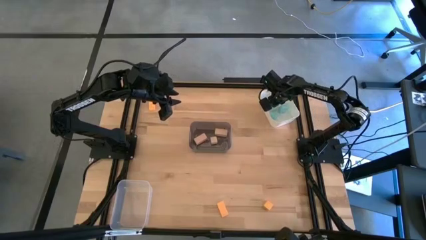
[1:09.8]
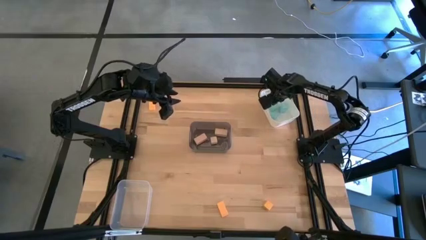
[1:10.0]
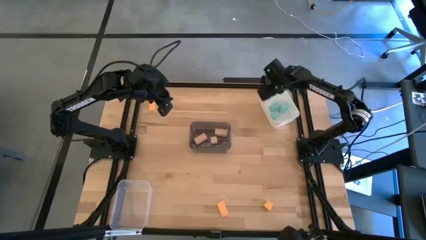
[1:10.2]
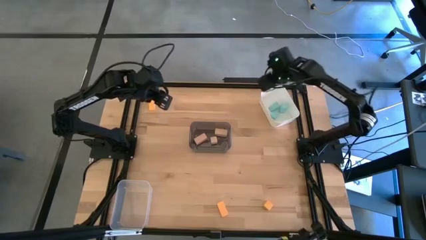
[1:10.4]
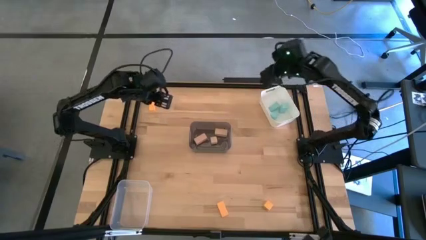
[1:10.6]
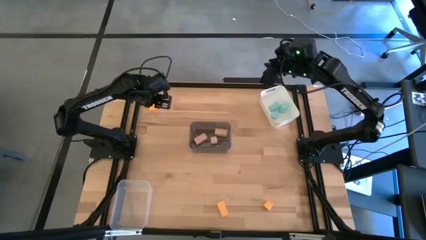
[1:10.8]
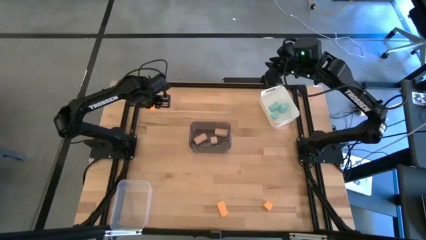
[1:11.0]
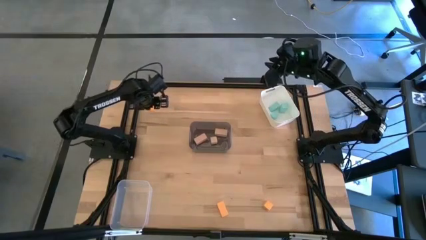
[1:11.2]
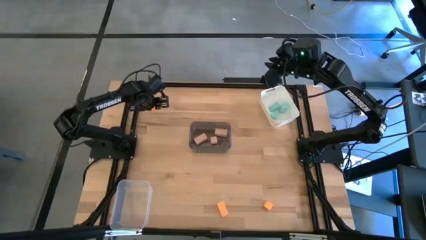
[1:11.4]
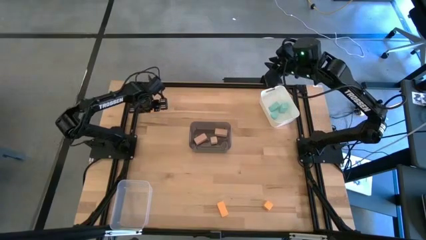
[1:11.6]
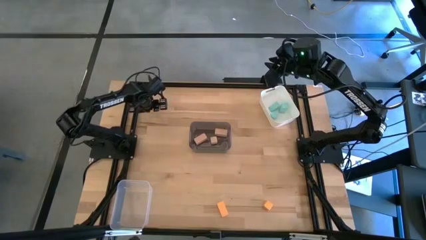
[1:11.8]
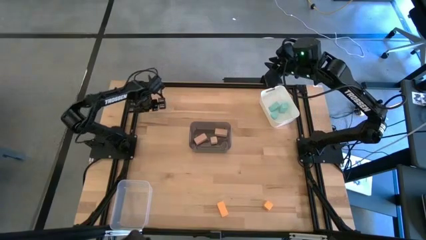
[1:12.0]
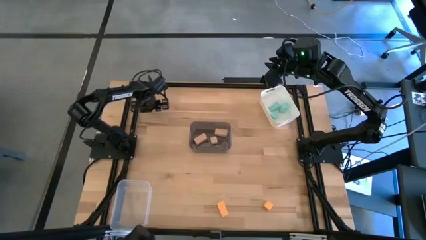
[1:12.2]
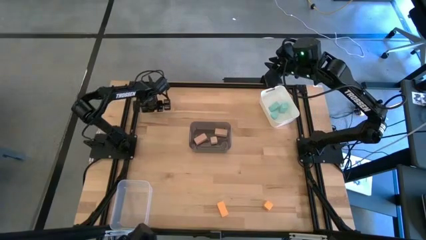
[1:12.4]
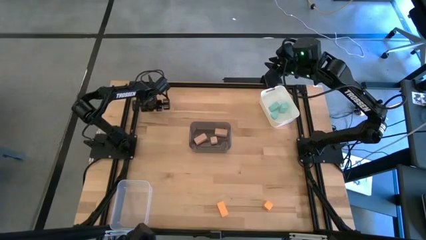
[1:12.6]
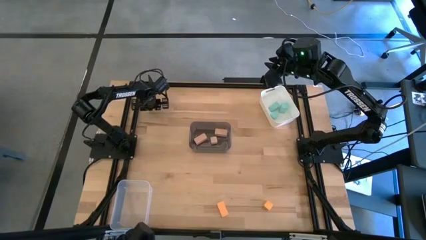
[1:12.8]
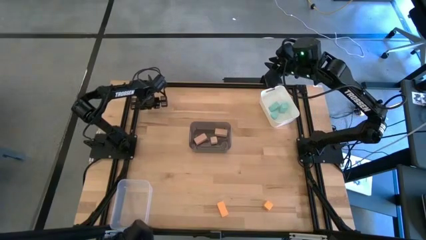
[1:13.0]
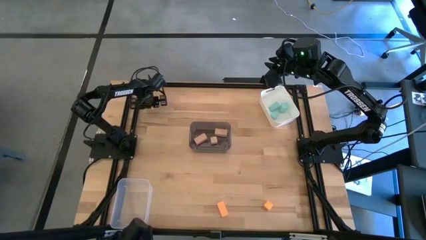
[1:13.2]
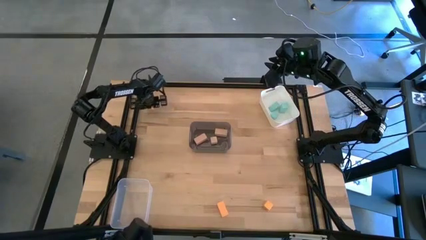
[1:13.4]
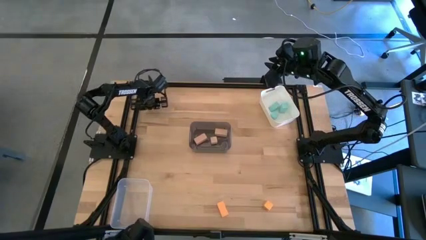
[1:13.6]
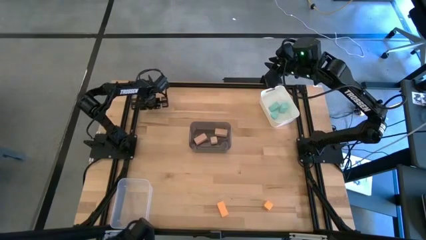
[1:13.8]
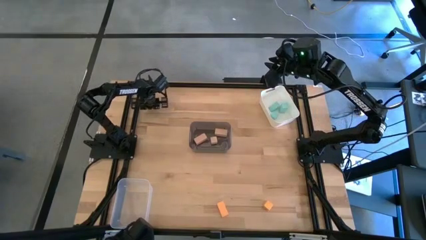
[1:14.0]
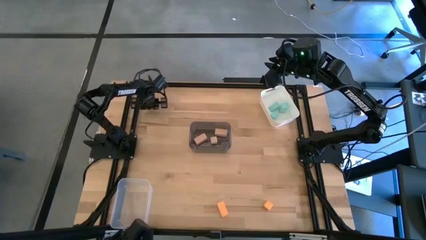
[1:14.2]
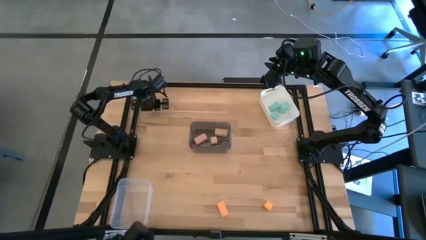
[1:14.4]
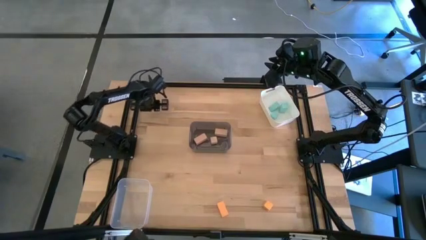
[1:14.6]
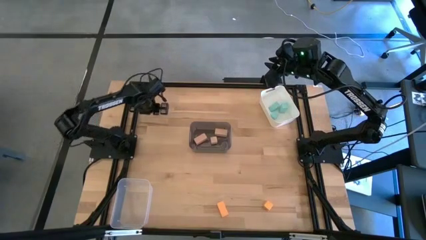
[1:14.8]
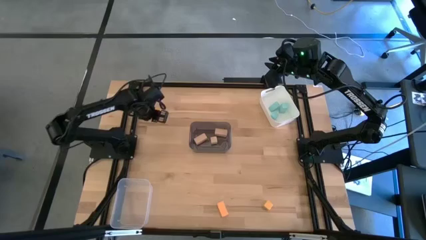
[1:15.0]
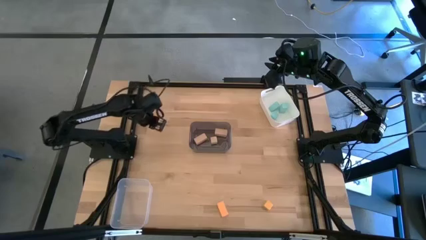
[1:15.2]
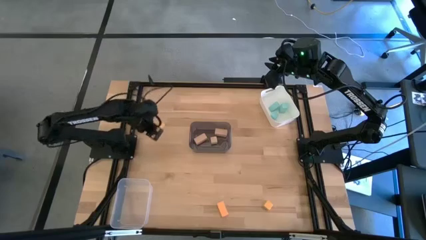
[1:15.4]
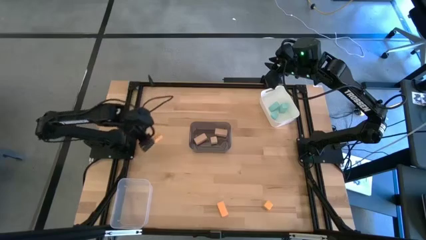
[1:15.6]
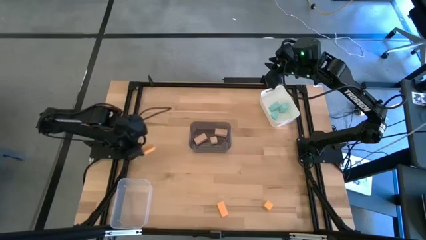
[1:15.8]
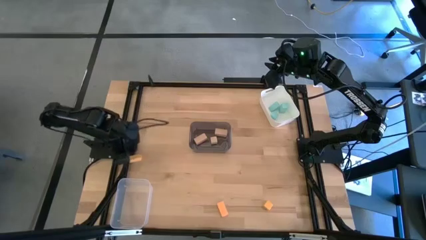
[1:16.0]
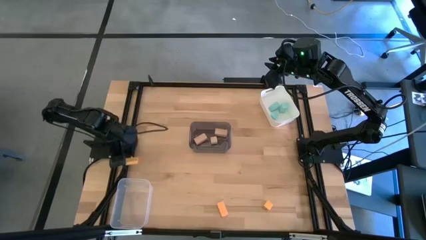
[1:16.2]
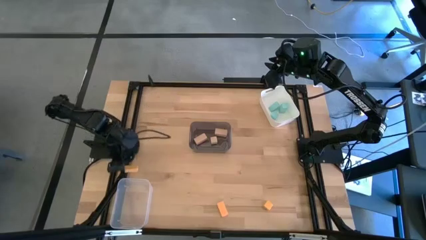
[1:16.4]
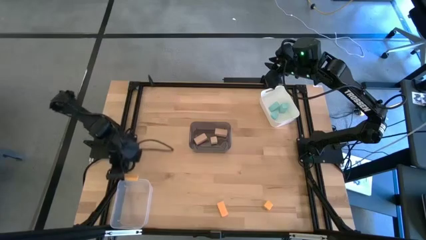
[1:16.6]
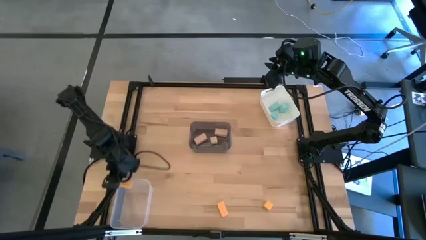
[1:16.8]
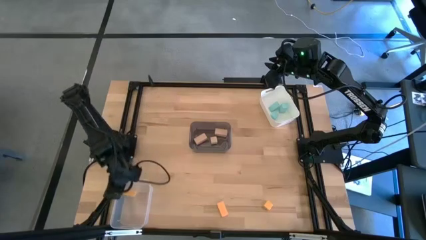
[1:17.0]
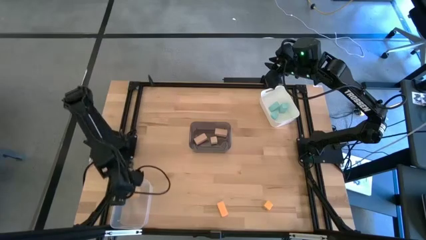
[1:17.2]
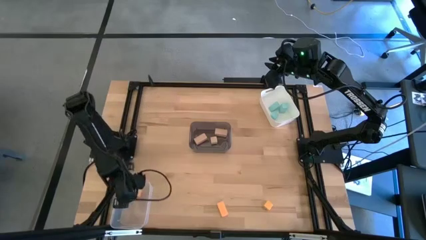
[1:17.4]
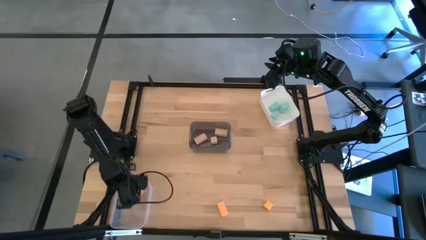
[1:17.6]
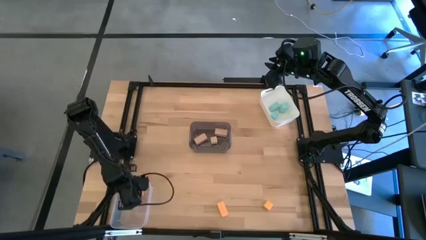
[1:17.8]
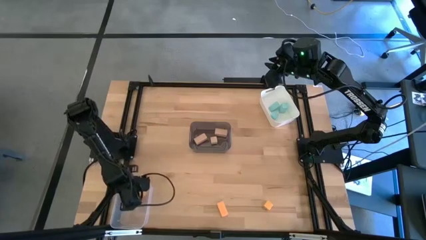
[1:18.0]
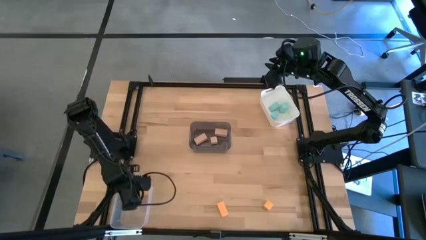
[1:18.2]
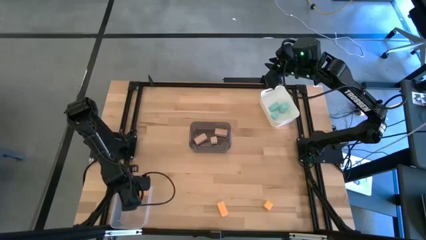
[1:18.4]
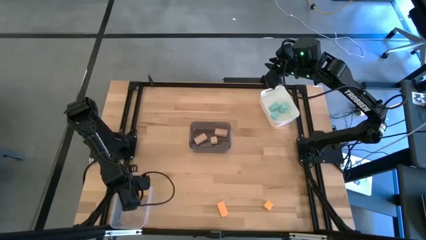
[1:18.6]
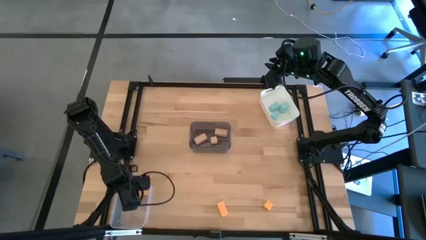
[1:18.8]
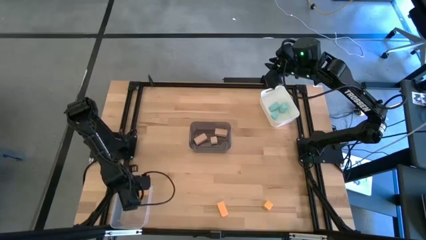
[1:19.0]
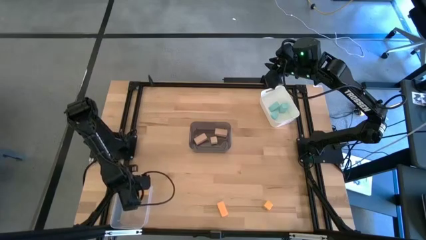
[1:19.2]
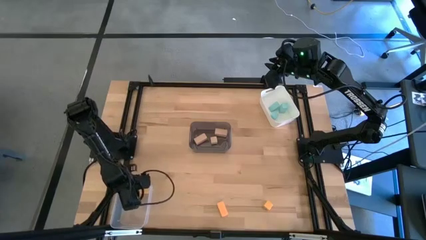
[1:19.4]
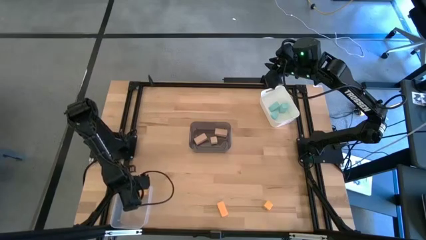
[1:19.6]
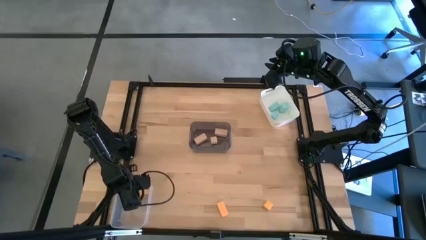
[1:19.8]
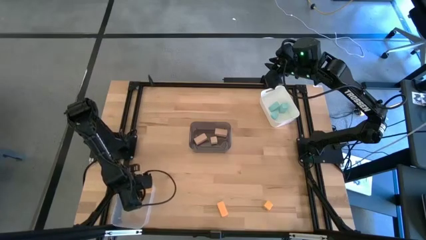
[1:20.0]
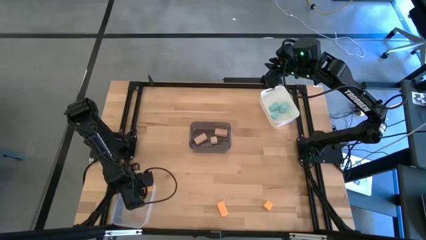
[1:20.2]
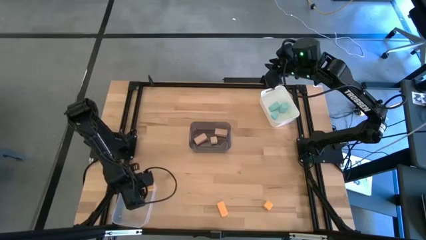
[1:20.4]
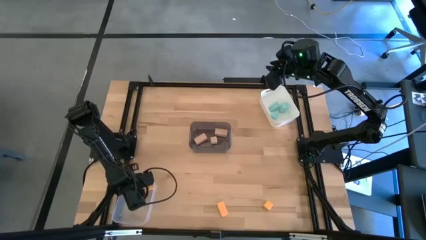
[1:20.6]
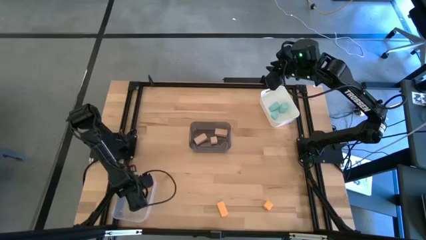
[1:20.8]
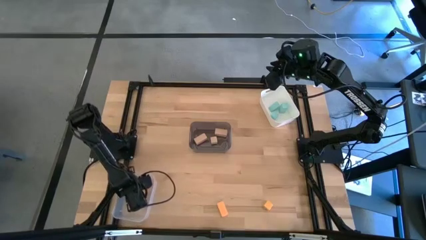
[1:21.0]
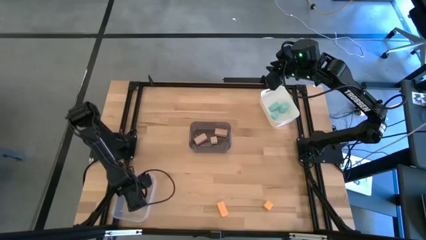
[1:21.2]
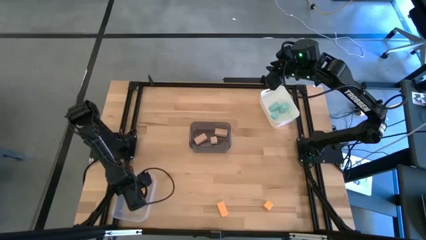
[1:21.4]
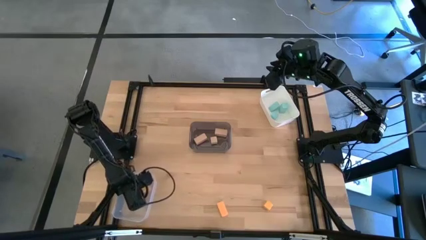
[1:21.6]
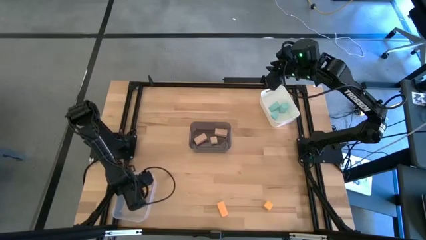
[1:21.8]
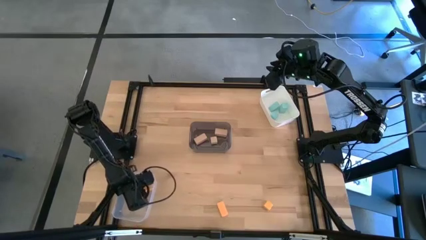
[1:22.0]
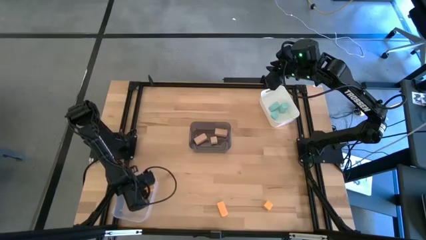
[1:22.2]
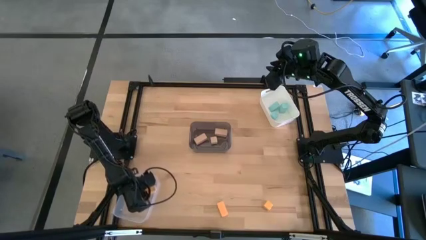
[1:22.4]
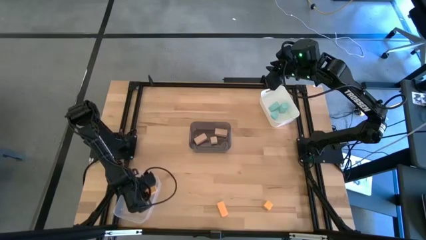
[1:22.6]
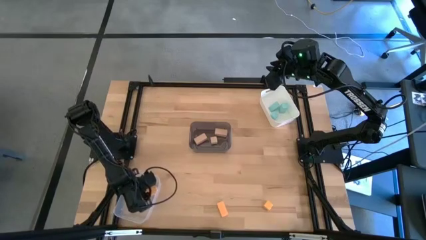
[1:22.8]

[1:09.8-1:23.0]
Task: Sort & place blocks by color
Put the top yellow block into the transparent bin
